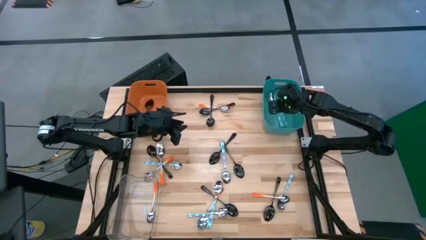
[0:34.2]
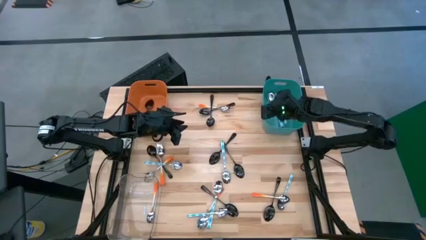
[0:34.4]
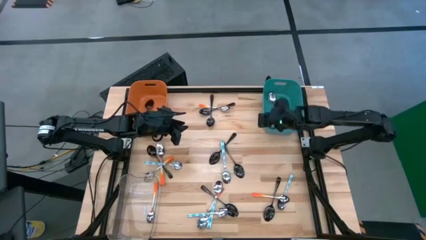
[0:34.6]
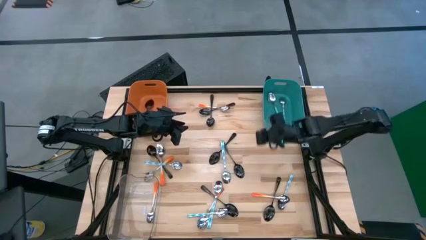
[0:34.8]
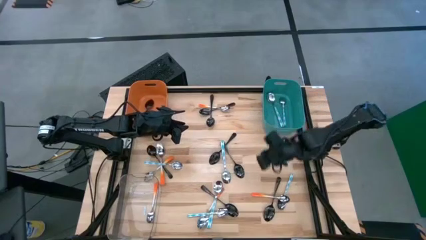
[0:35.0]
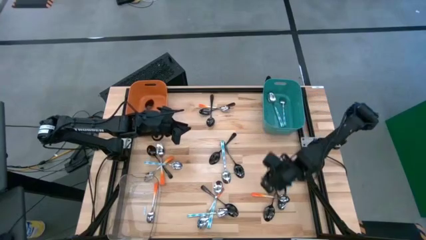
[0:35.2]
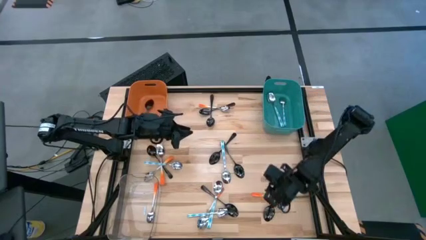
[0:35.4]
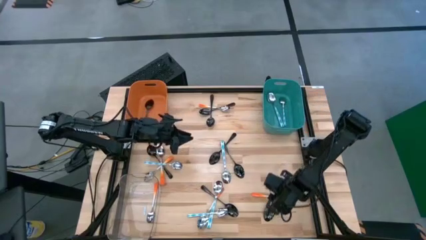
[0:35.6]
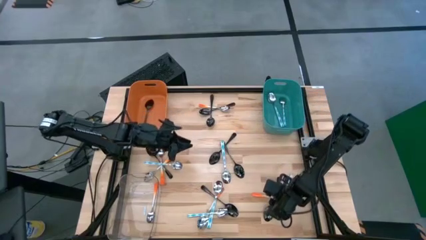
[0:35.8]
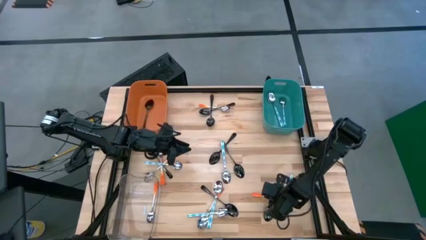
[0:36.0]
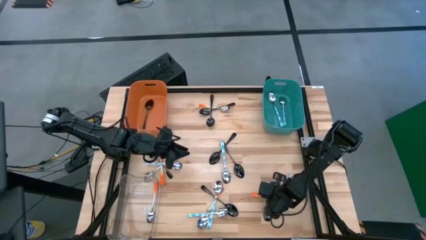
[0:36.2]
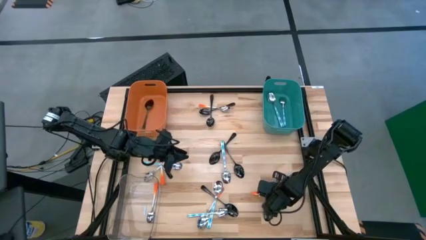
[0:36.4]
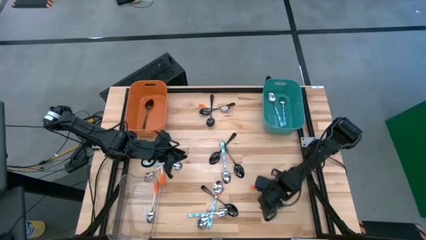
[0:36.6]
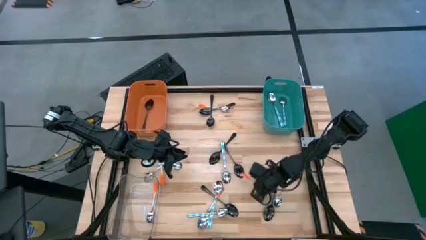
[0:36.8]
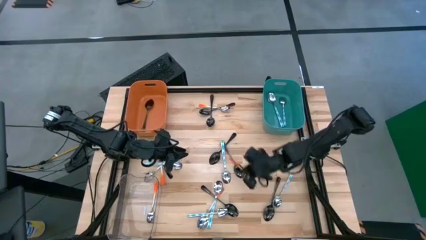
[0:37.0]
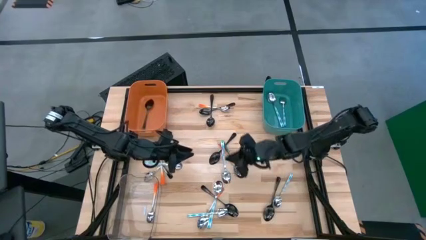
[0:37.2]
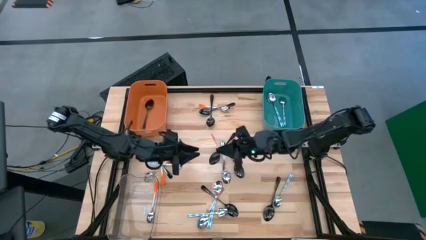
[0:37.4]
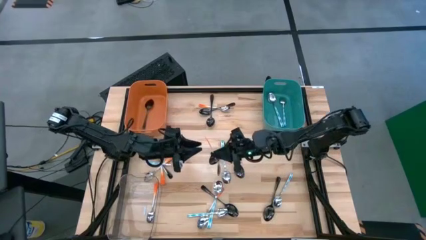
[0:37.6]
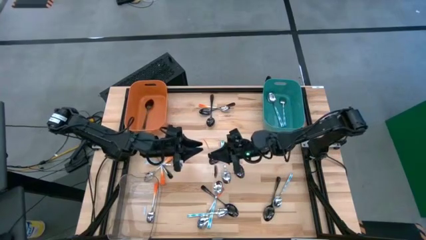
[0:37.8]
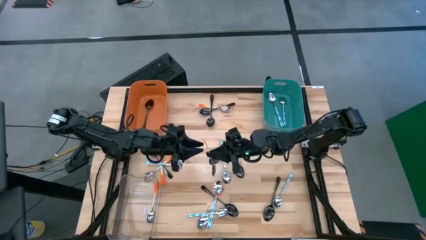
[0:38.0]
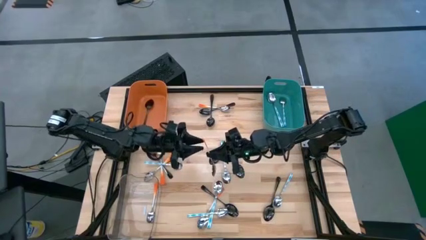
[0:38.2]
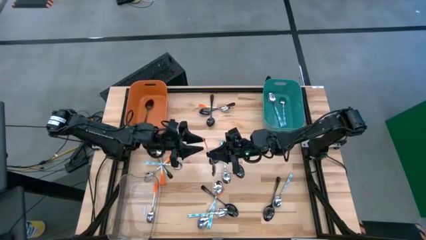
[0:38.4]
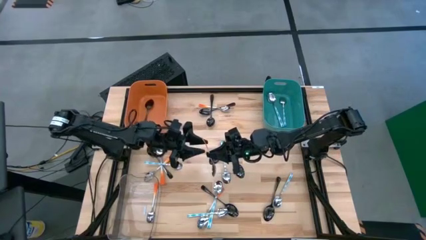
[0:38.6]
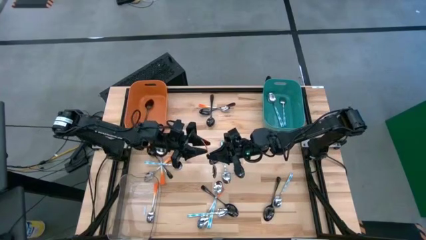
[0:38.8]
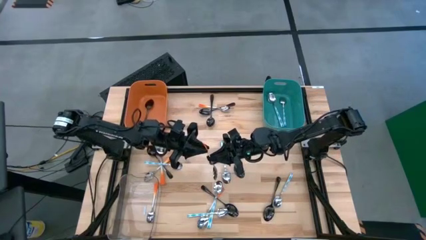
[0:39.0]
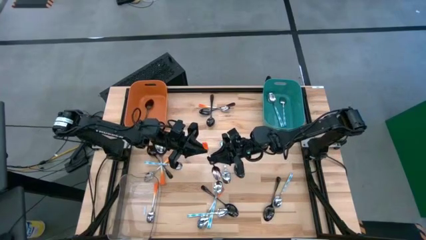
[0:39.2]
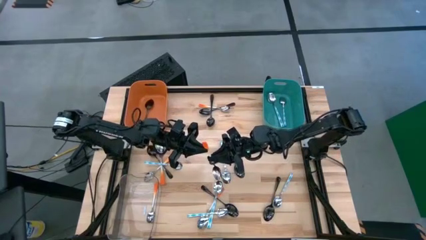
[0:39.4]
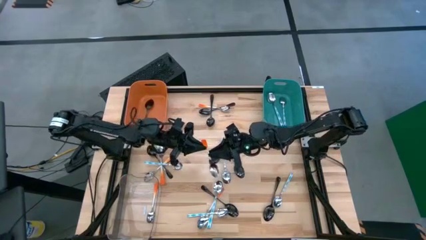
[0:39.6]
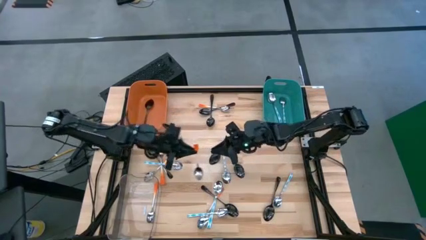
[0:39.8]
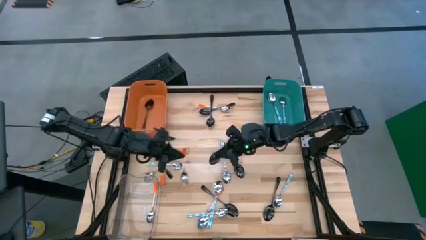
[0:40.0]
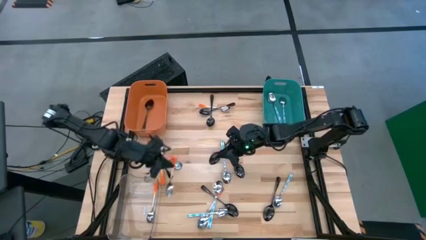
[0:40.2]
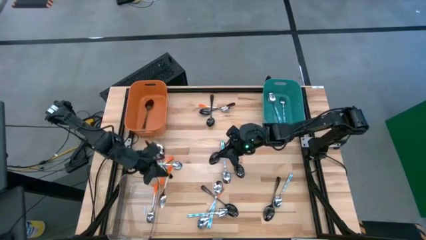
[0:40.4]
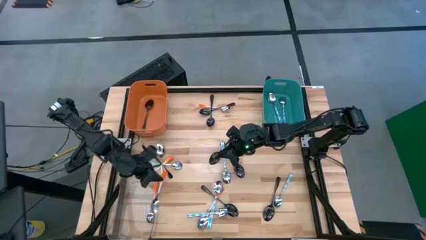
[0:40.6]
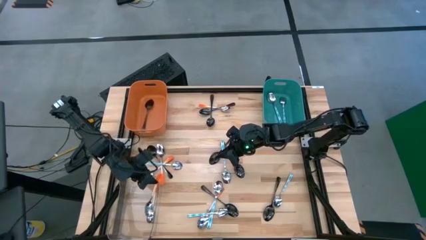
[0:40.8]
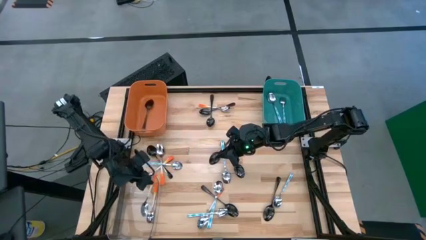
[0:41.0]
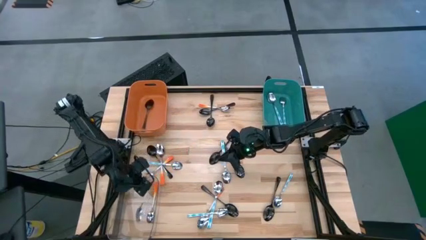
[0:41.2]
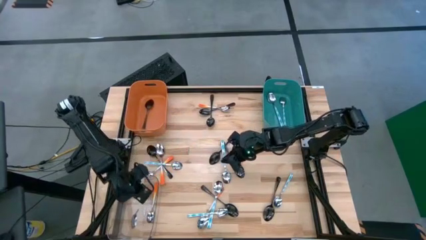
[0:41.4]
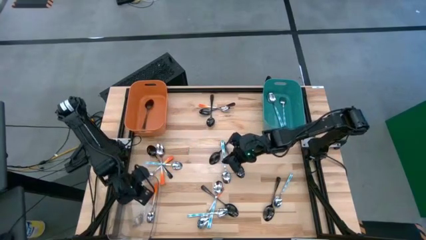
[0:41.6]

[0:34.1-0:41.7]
Task: Sort silverware by color (type)
Put the orange spoon into the transparent bin

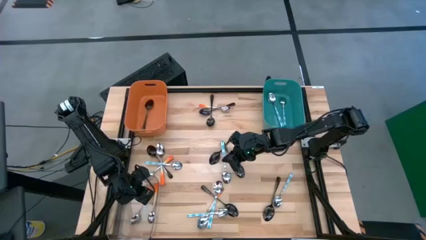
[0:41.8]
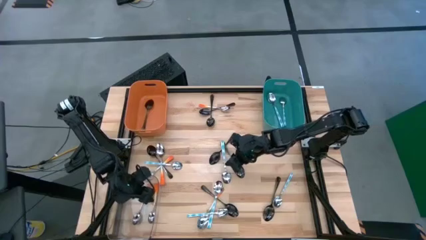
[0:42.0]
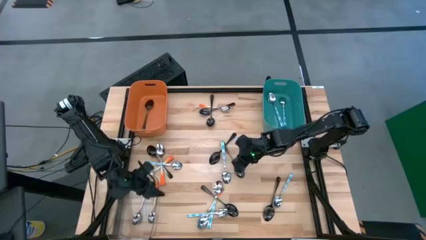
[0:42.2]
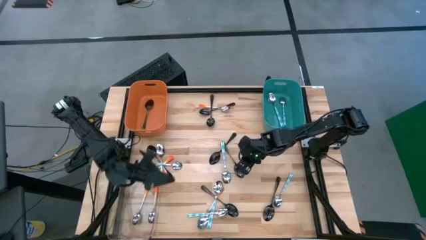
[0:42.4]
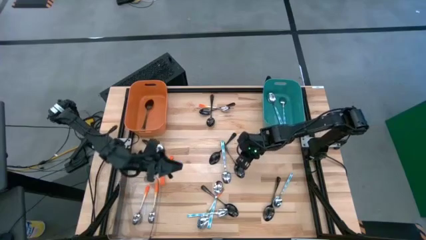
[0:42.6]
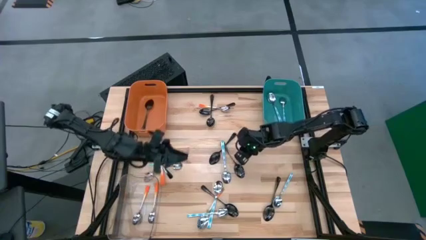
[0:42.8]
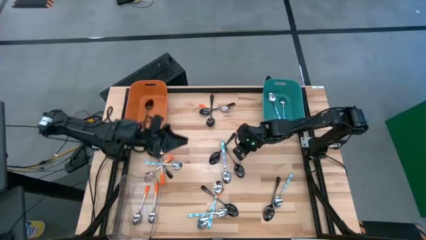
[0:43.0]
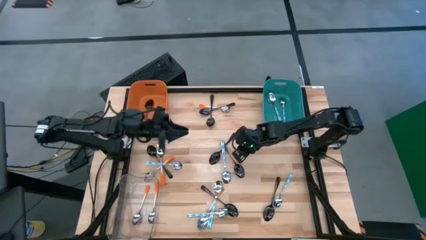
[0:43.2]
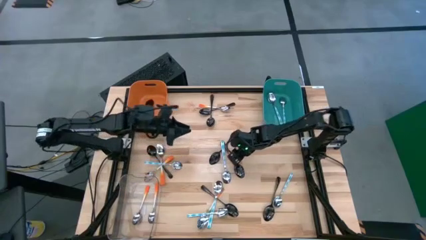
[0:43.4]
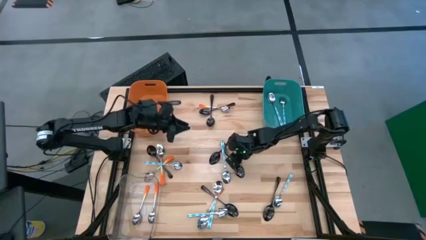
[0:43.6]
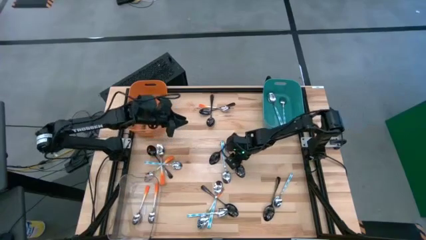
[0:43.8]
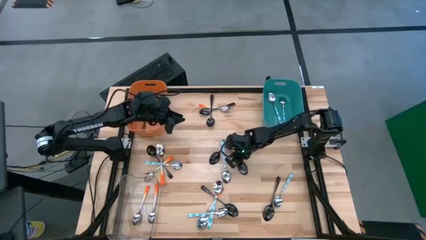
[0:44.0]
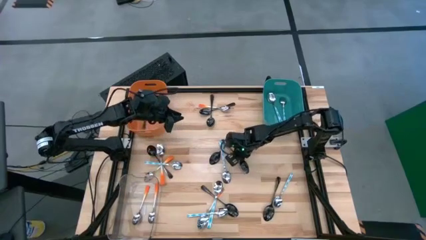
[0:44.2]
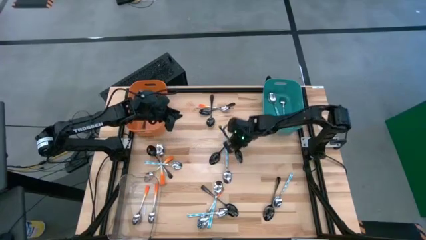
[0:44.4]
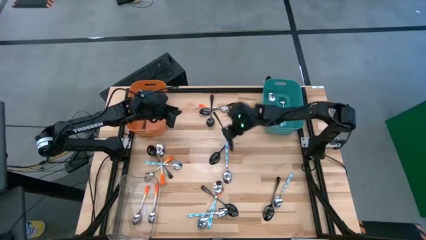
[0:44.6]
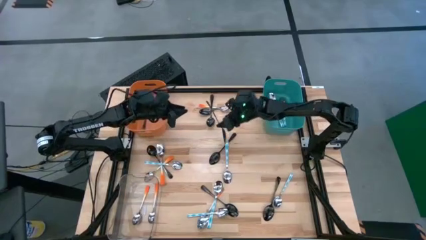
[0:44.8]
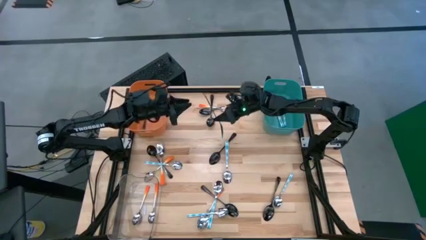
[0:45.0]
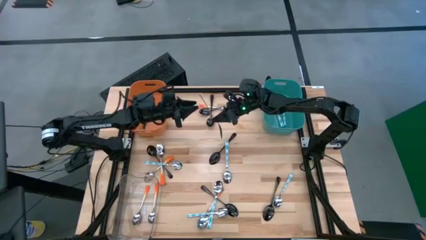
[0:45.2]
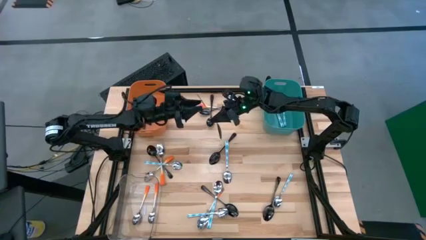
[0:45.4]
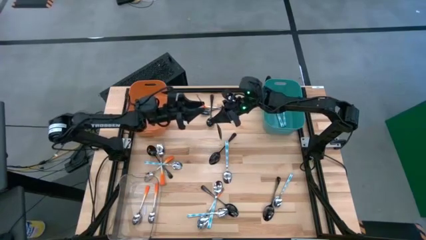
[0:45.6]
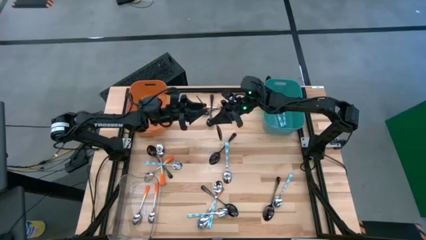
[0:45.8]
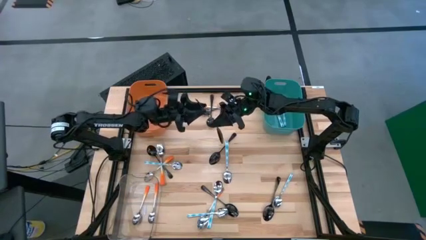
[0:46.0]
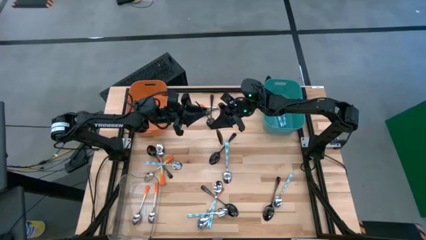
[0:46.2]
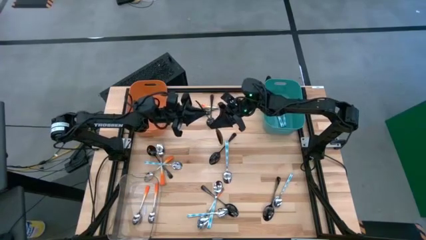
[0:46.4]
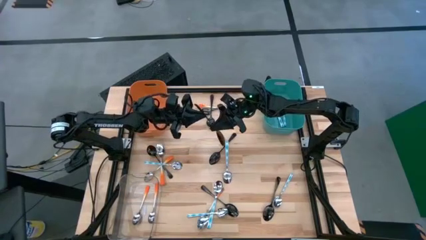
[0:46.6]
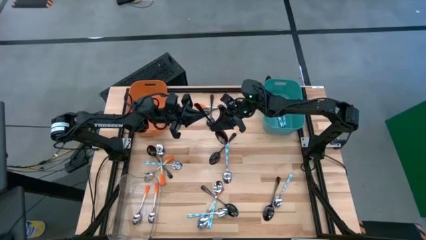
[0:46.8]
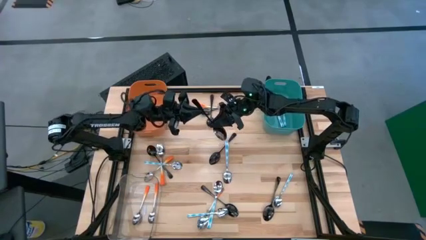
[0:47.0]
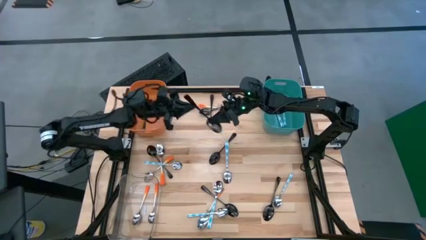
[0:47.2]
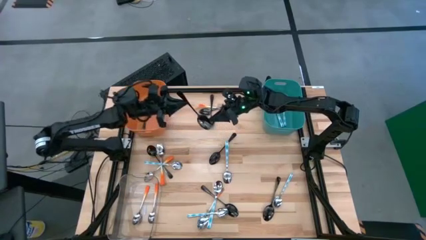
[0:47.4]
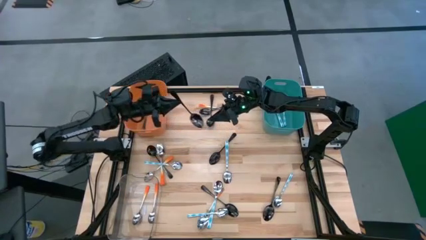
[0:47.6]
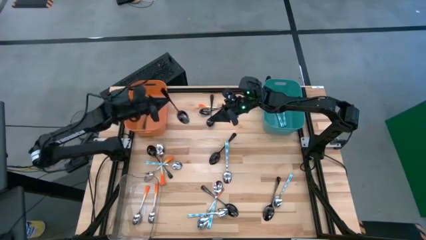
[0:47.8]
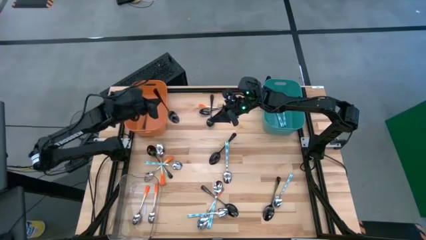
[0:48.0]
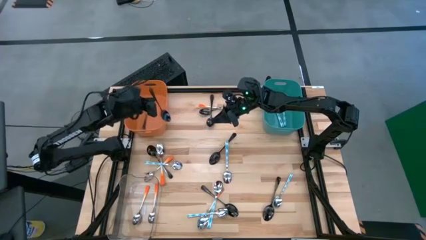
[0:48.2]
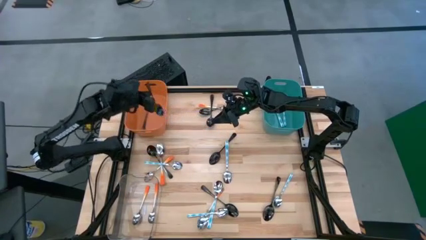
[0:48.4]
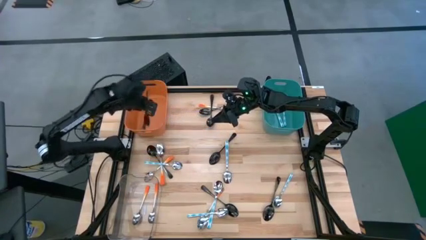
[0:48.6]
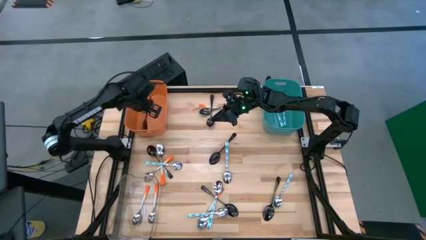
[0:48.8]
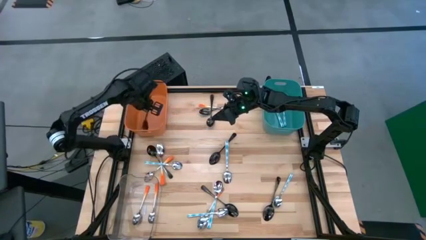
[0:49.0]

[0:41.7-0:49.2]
Put the black spoon into the orange bin

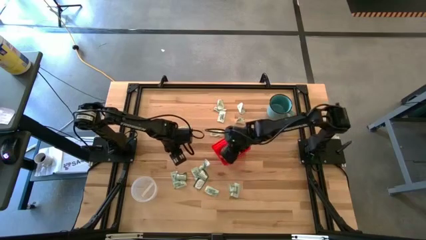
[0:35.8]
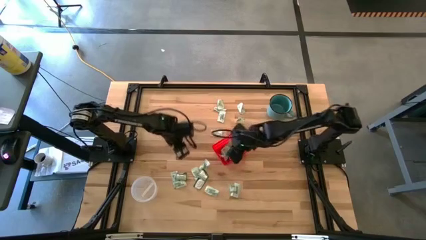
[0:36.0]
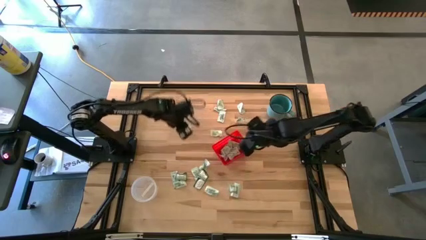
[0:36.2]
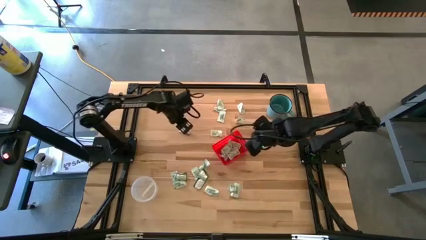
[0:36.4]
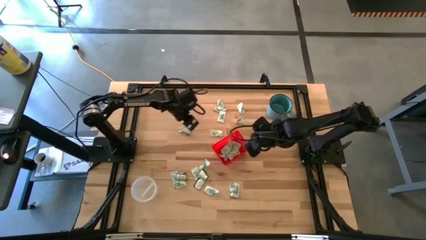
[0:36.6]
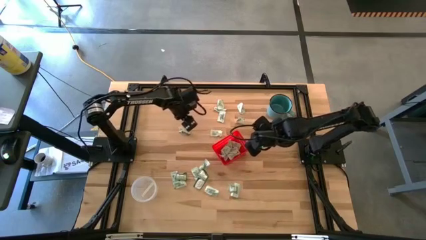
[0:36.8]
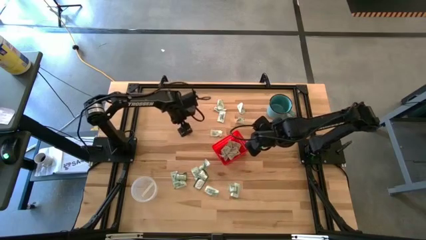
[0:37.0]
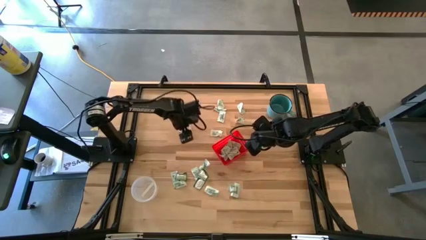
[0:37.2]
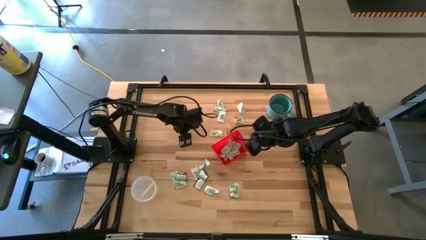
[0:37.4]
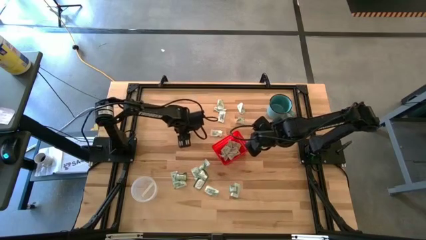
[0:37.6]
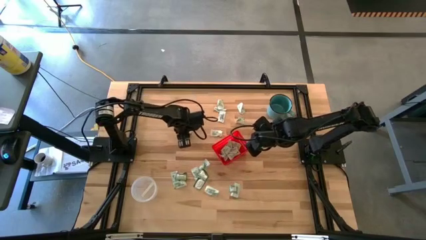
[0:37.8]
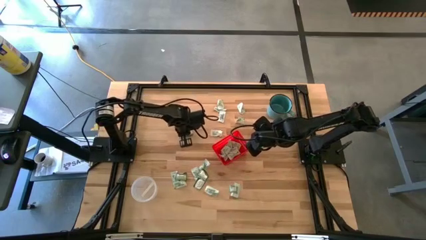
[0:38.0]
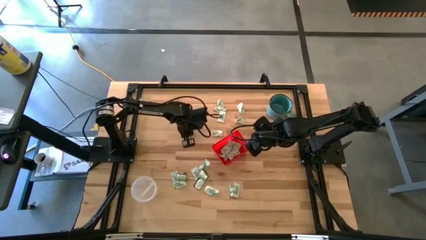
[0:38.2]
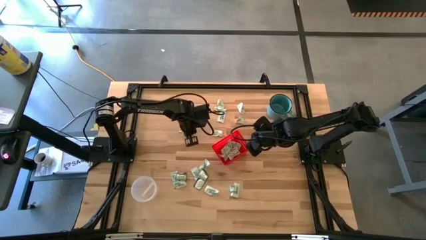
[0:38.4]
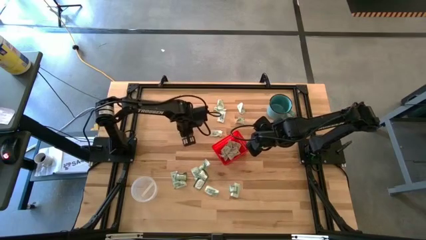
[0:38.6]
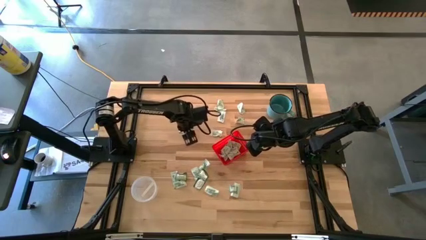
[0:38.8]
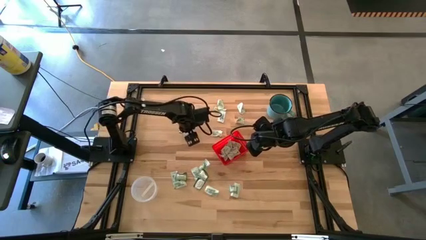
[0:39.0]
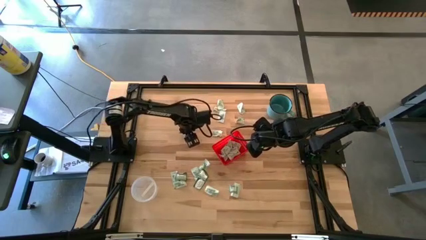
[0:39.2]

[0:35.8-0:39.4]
Task: Pick and place items into bin
Put the green stevia pack into the red bin
